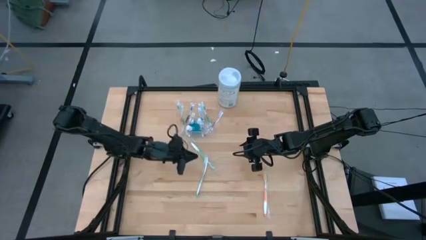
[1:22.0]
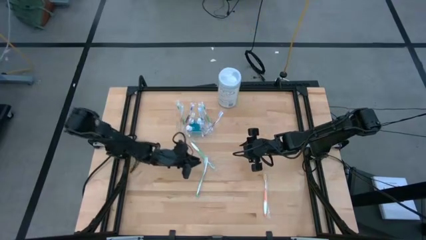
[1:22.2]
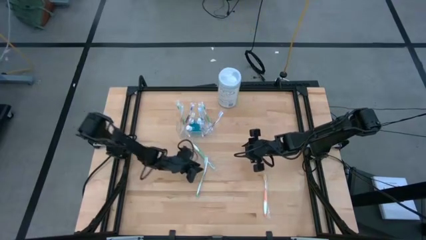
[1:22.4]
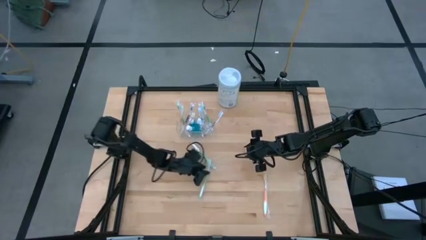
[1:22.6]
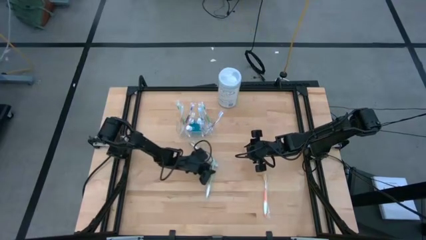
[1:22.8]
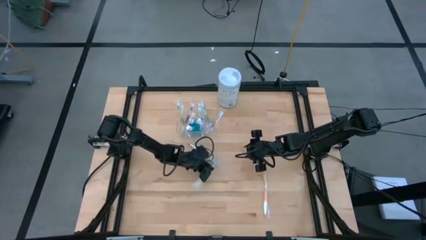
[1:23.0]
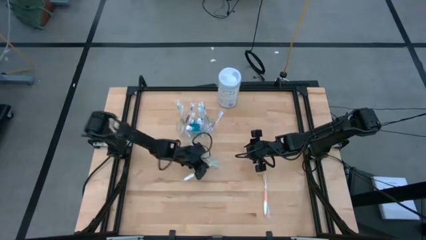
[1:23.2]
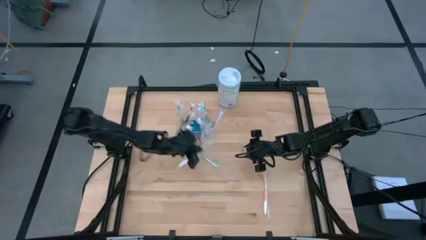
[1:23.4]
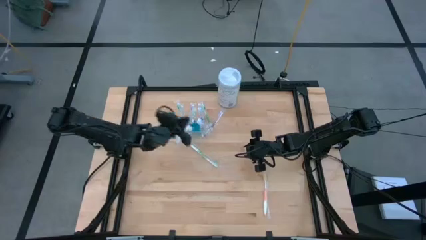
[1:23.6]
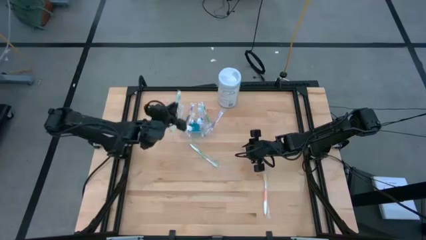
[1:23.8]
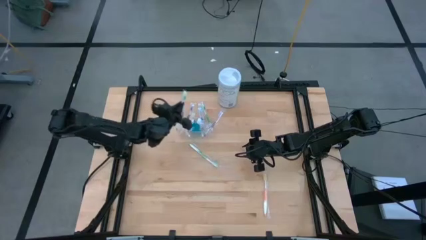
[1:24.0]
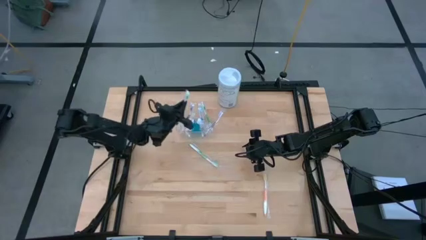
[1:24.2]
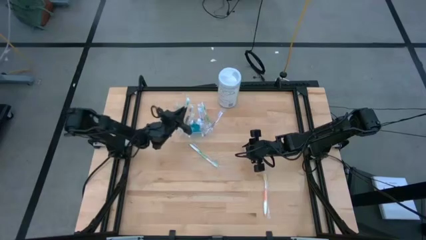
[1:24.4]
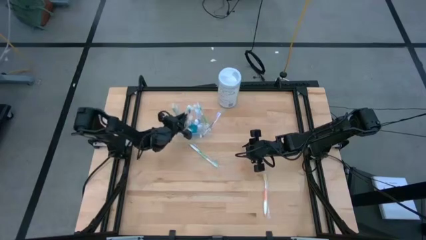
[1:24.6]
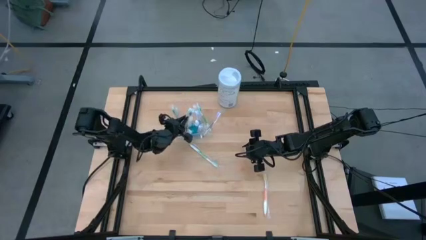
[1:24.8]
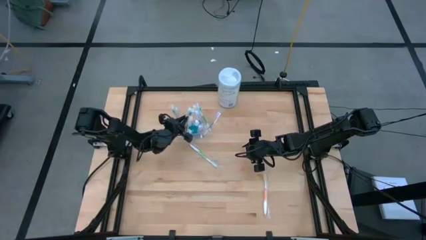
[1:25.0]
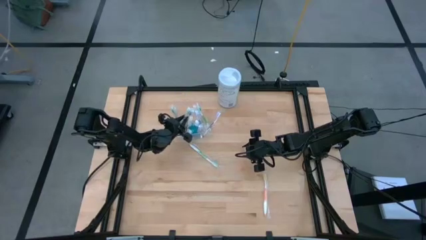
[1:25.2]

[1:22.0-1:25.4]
Task: Pick & Place toothbrushing station
Put the green toothbrush into the transparent organizer

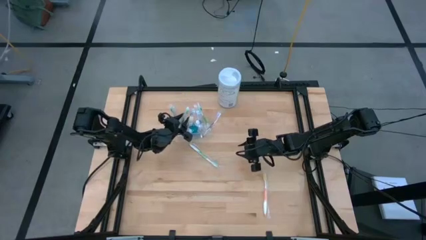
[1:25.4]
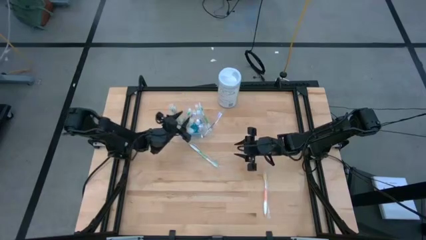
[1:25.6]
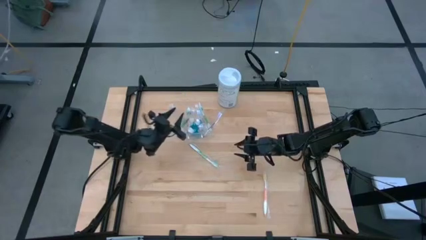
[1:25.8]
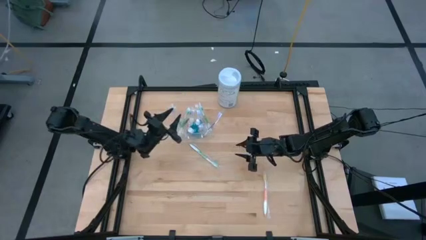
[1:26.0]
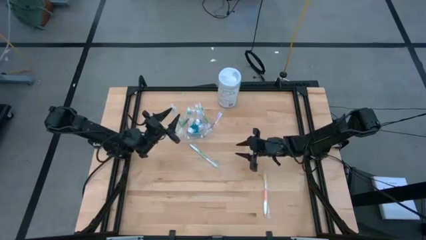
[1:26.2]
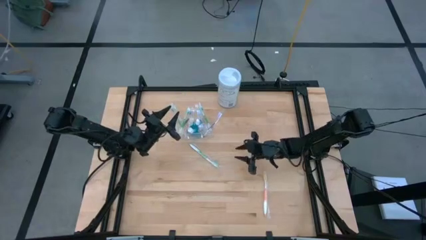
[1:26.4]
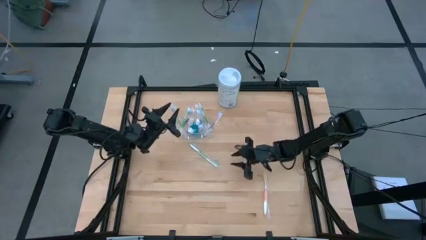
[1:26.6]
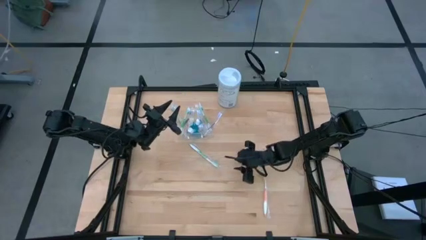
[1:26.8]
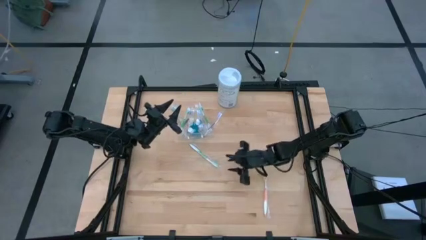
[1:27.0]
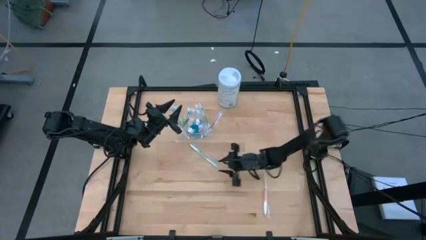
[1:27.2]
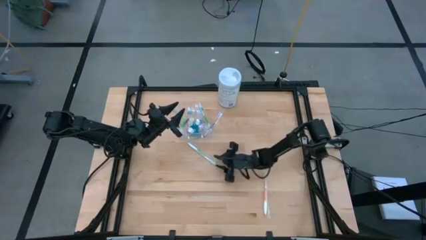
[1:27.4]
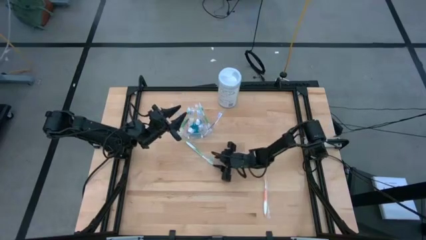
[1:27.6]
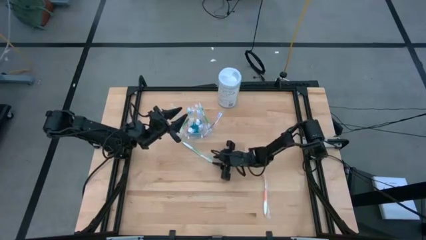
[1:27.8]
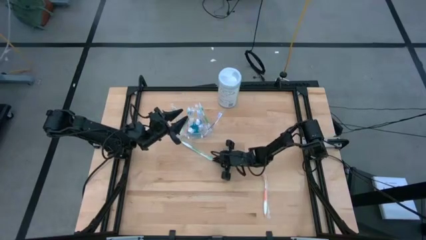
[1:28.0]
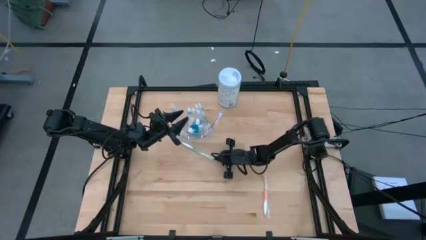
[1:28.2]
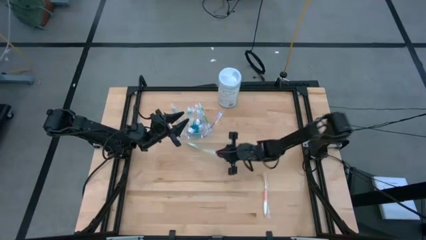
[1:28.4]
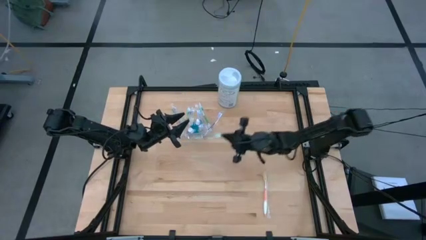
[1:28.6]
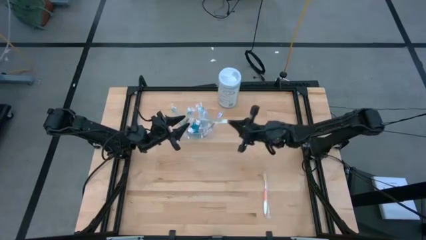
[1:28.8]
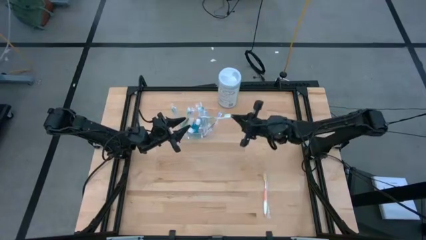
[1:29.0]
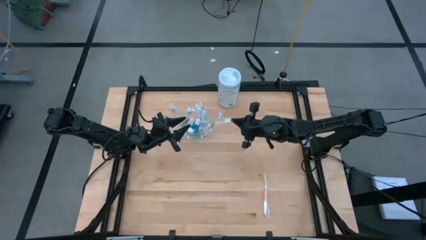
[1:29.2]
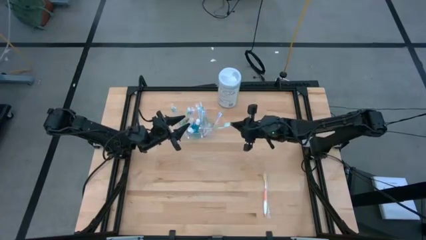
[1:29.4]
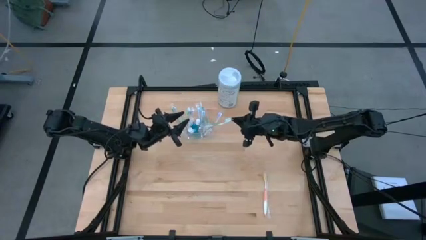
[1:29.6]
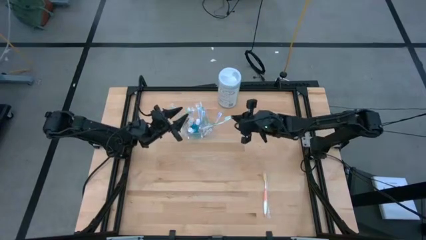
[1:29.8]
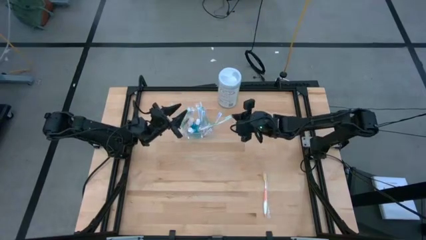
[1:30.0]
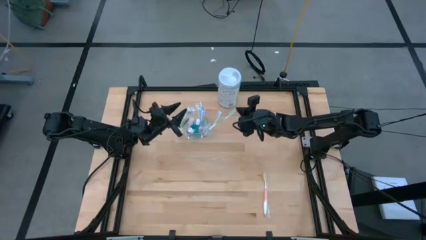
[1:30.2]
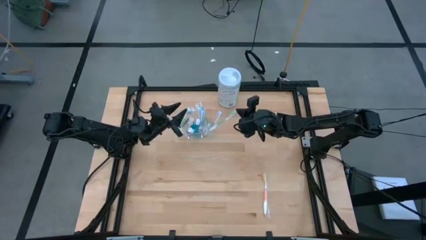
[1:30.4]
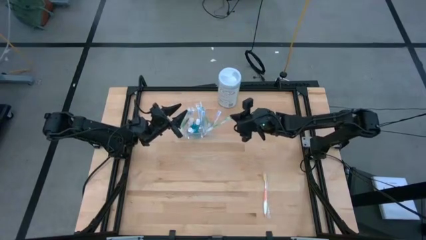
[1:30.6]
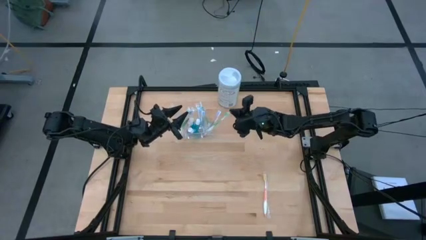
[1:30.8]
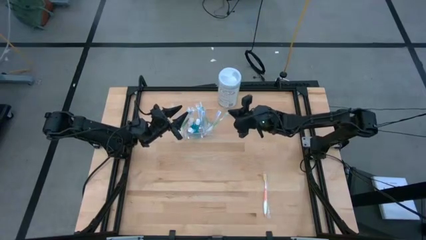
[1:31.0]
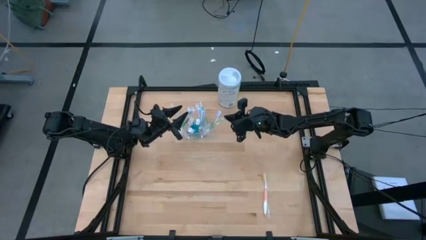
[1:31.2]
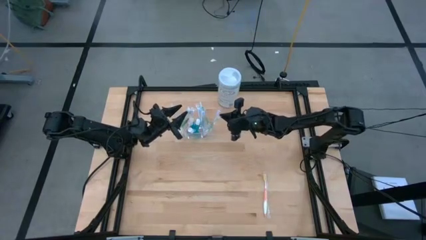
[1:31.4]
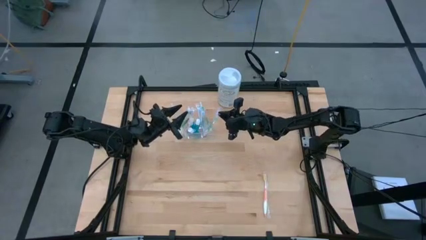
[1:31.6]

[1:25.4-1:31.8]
Put the green toothbrush into the transparent organizer

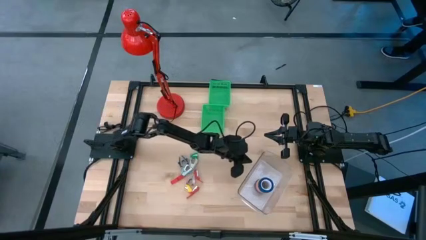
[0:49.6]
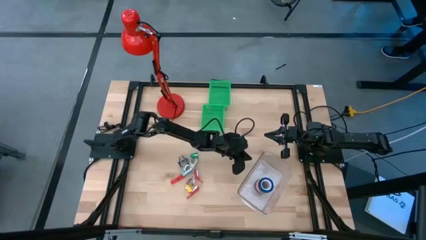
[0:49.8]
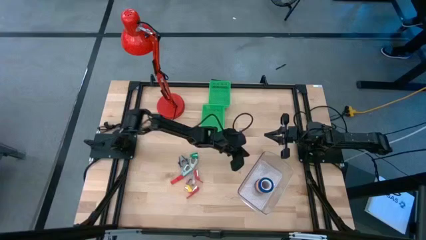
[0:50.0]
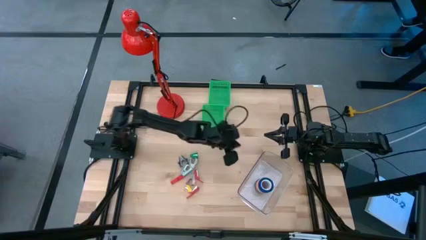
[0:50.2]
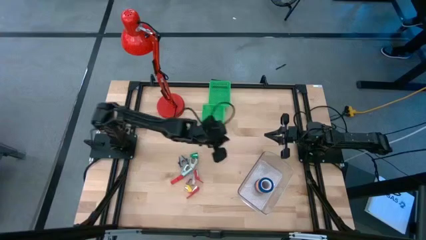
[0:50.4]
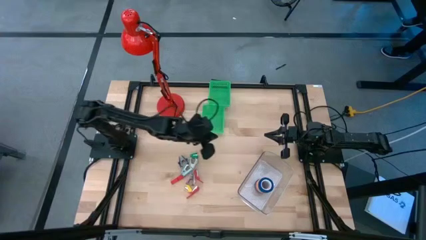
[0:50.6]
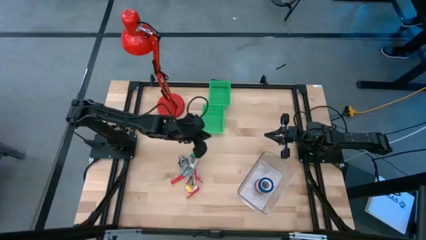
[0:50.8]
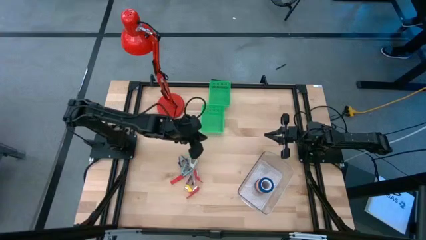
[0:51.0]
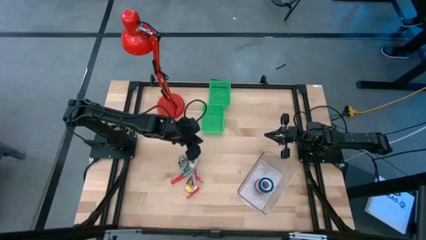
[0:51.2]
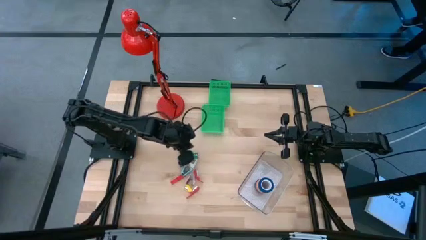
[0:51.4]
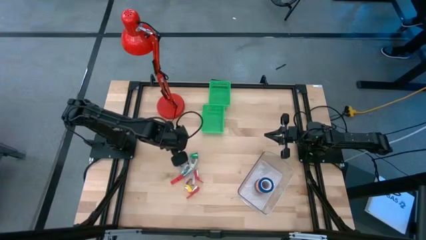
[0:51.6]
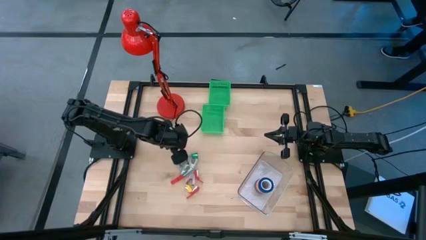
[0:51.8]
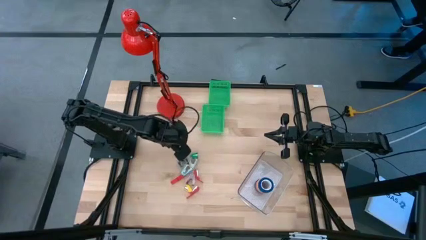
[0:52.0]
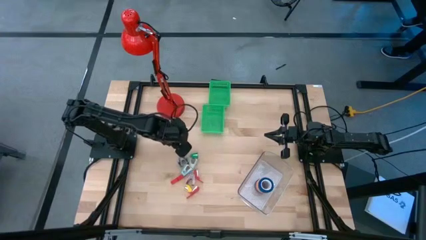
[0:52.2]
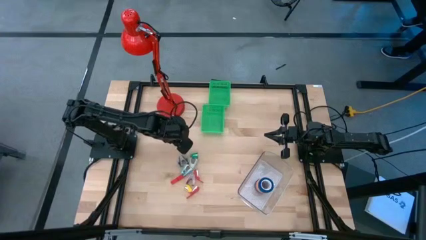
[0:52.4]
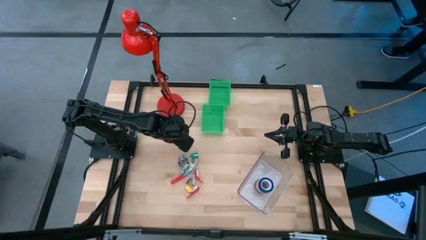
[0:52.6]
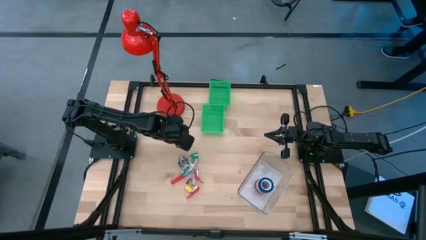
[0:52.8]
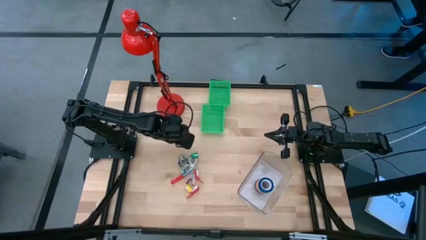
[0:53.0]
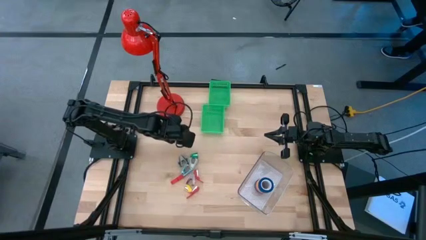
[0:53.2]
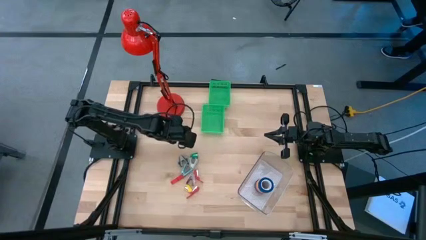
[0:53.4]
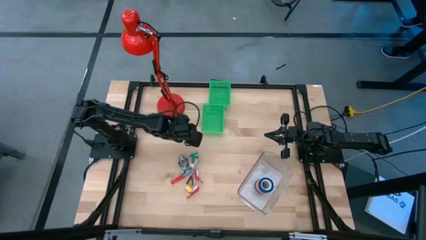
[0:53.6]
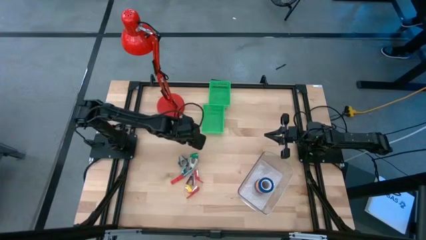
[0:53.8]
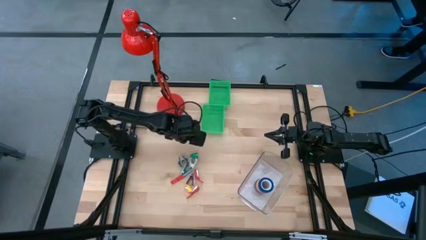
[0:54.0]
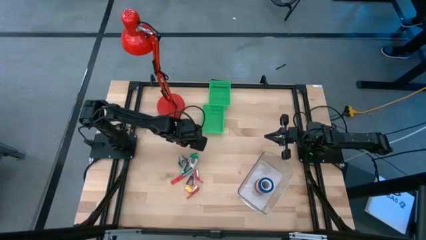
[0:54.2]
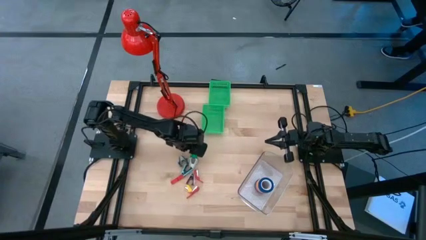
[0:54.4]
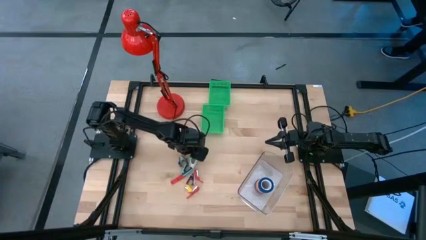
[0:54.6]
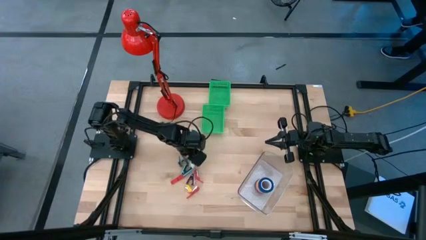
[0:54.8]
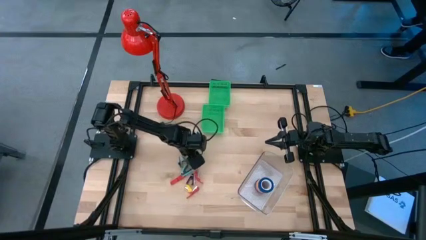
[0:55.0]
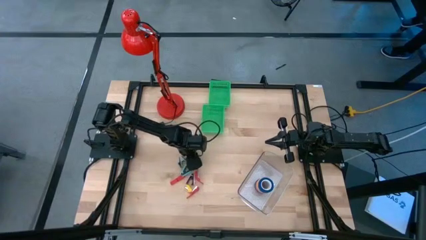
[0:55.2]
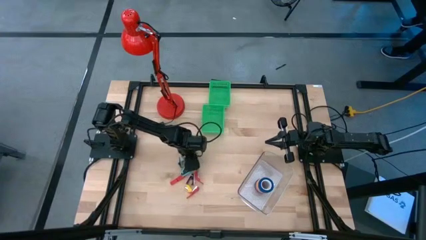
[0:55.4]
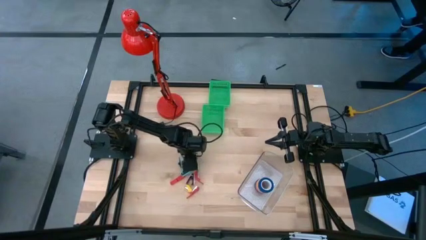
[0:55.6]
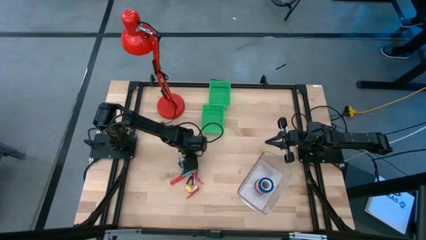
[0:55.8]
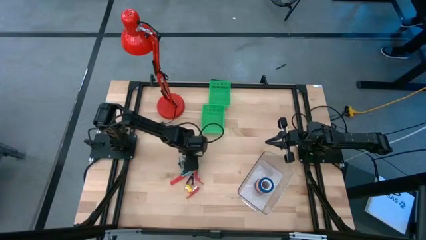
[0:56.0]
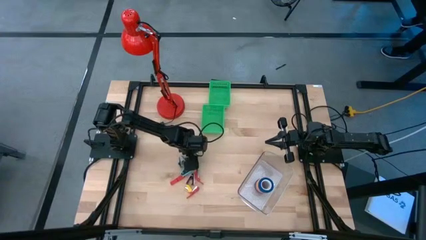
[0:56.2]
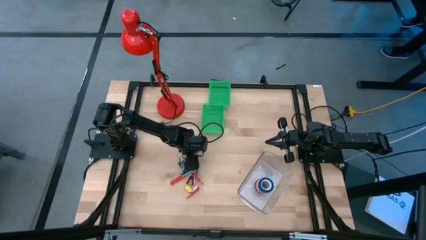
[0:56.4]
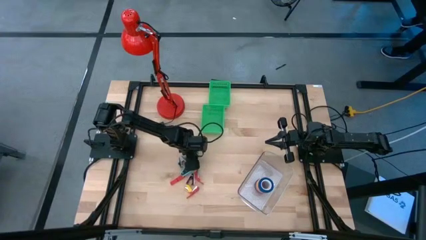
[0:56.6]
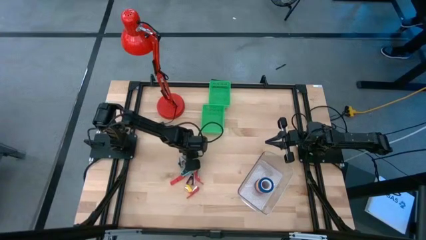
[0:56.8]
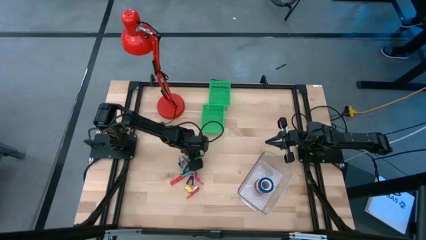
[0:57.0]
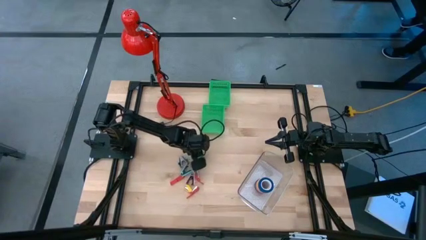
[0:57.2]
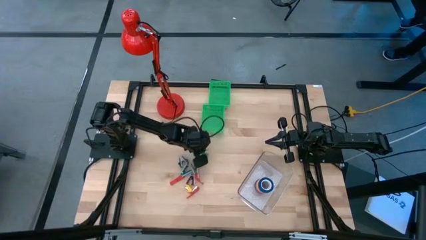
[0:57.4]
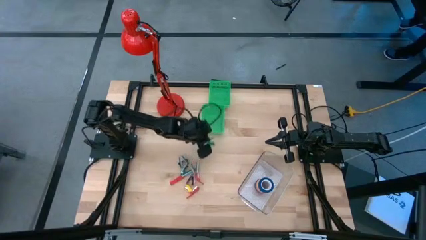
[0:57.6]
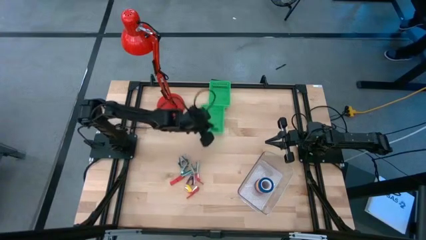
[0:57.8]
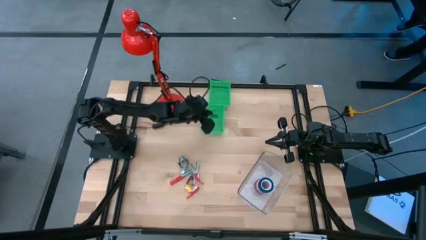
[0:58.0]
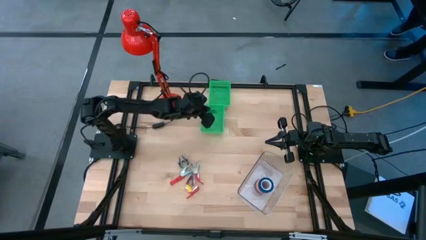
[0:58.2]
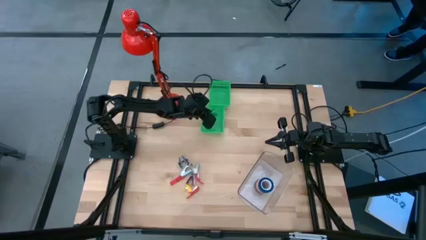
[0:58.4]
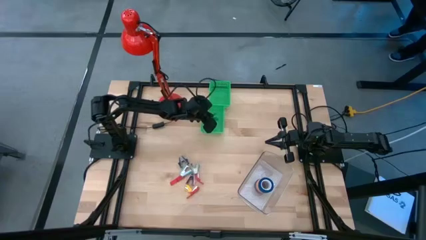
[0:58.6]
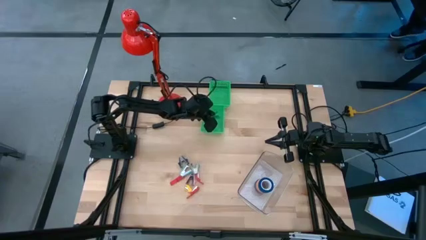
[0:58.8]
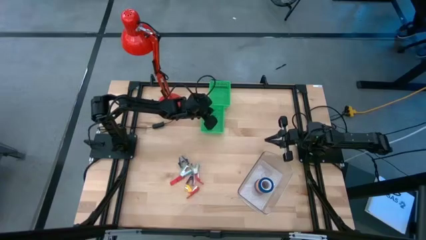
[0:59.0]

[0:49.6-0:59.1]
Task: Pick and place Stapler, Stapler remover, tape
Put the green stapler into the bottom green bin
